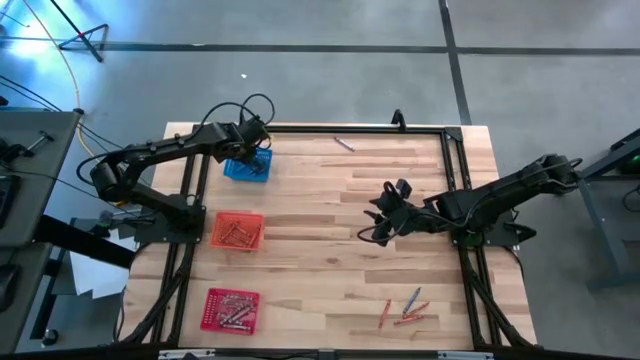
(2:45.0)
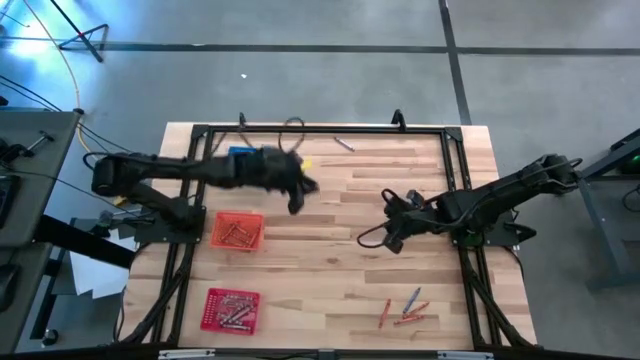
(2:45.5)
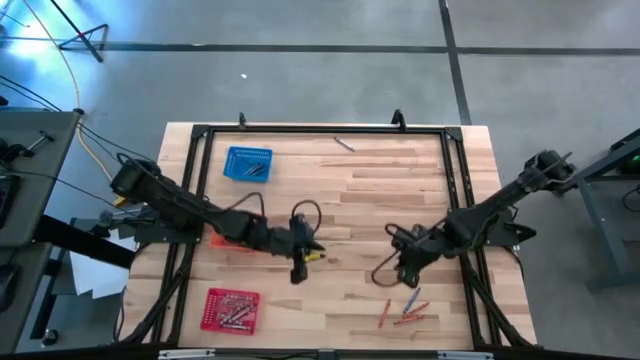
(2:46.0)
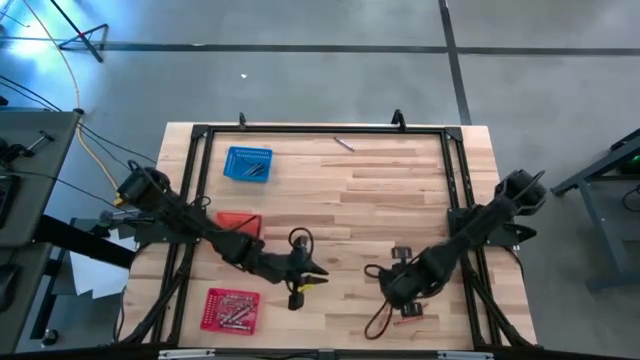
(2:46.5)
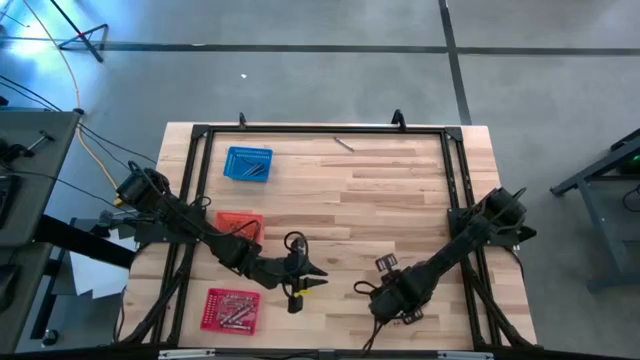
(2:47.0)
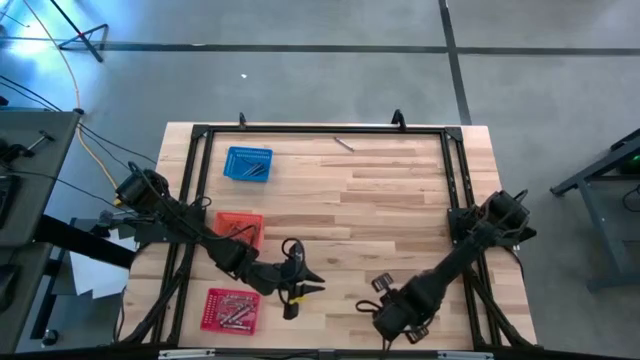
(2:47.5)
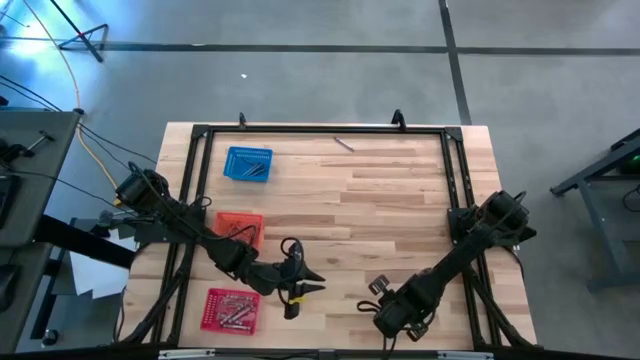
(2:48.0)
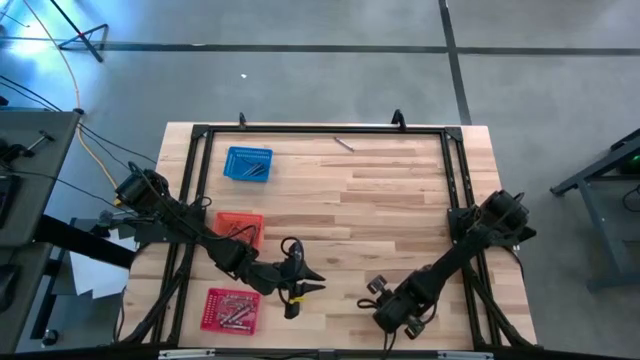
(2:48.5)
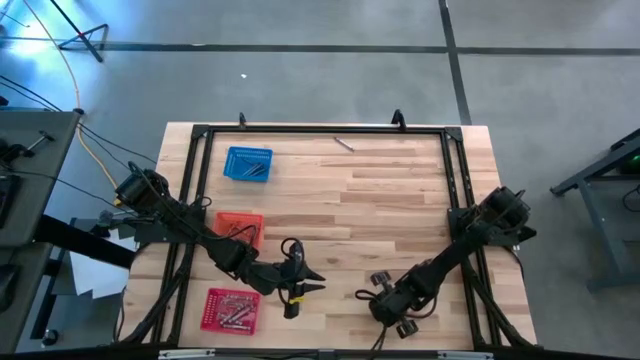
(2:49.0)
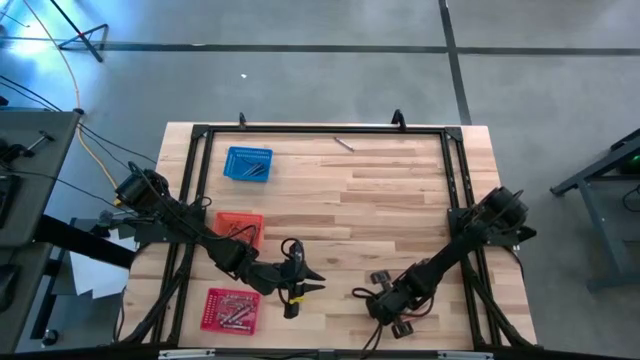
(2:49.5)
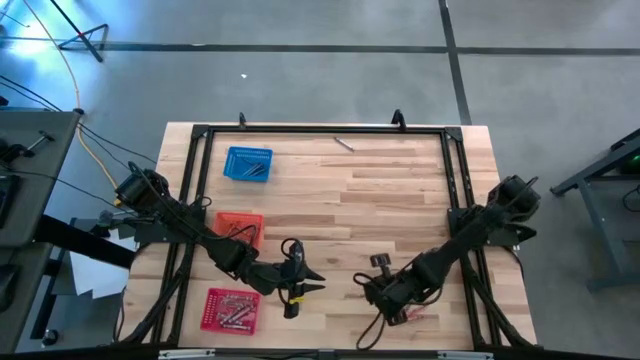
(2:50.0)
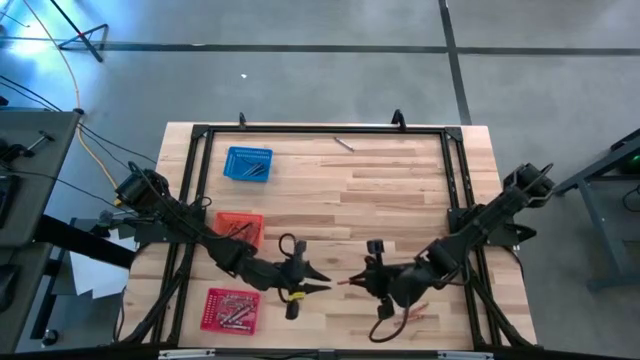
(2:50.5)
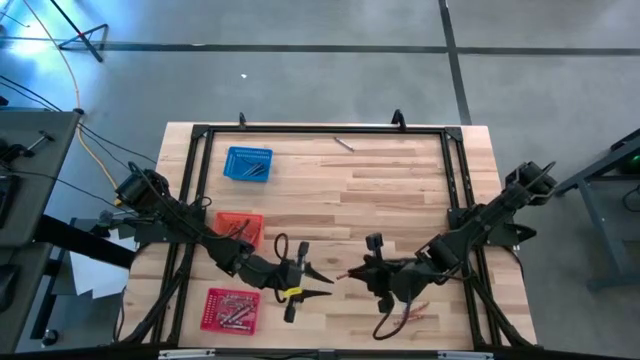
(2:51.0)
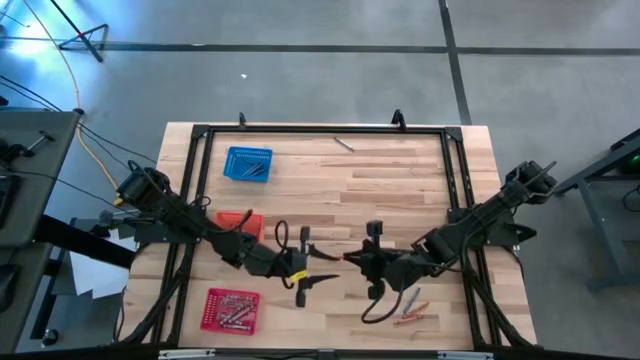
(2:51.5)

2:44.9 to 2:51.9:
Task: Sort crayons
Put the orange crayon into the orange bin

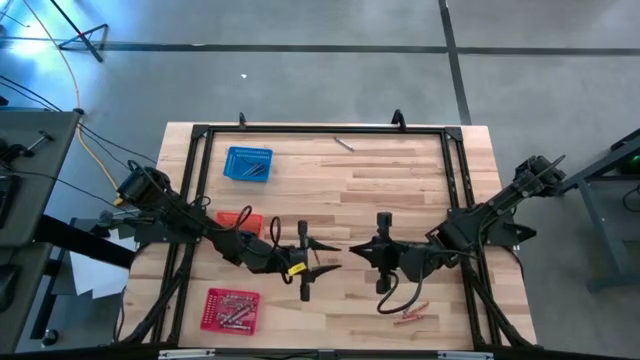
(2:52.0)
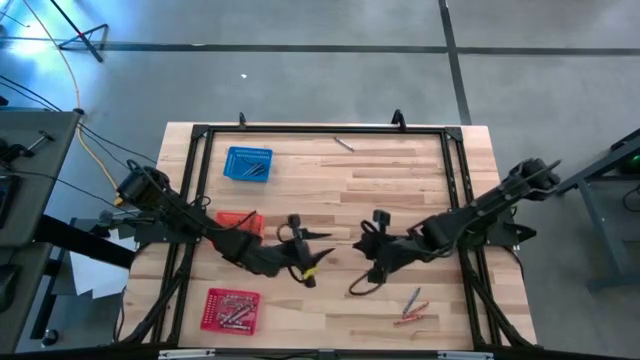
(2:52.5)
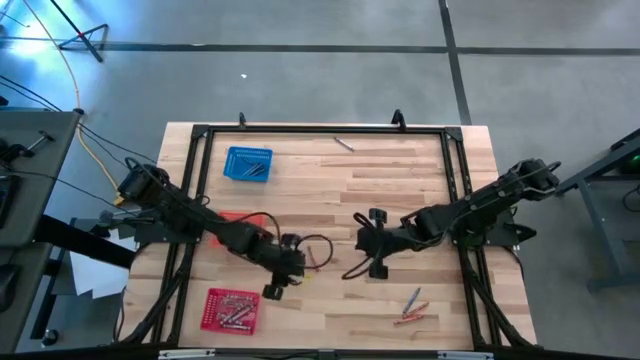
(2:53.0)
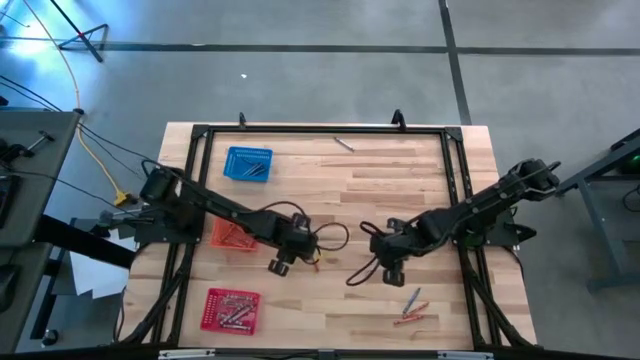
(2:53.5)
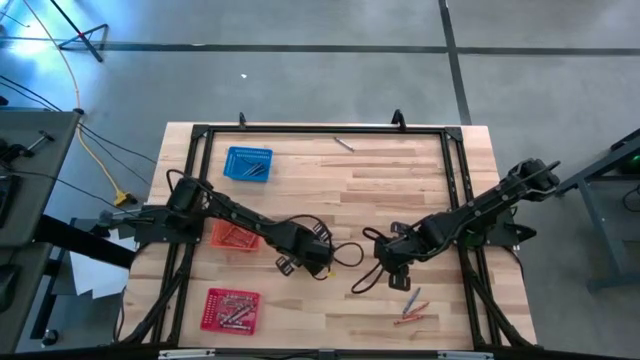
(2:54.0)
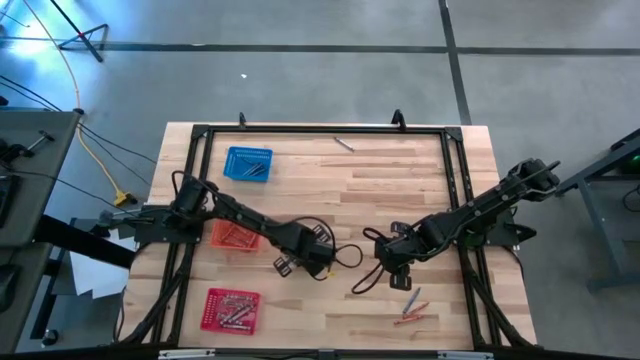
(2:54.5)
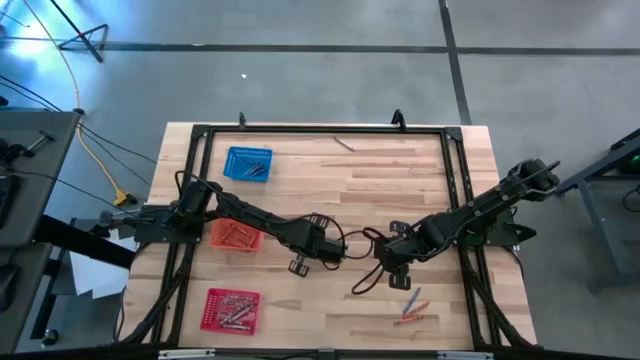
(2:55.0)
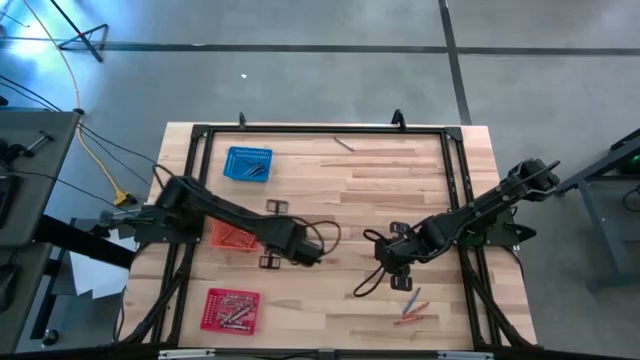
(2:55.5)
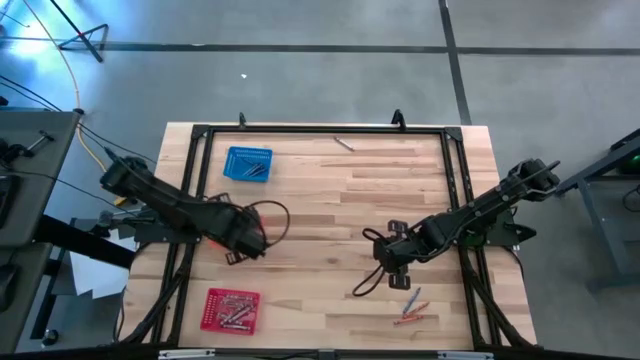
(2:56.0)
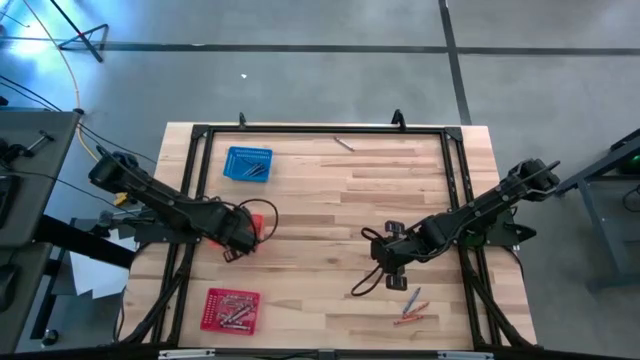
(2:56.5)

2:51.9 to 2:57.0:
Put the orange crayon into the orange bin

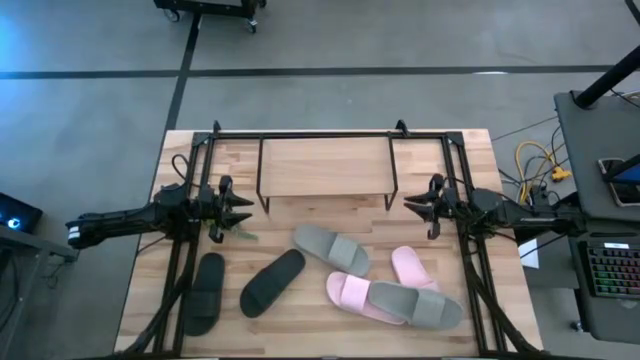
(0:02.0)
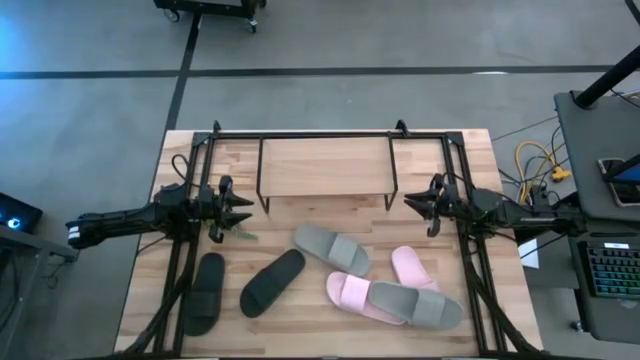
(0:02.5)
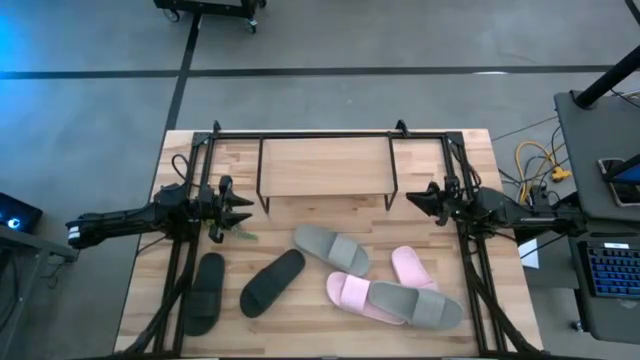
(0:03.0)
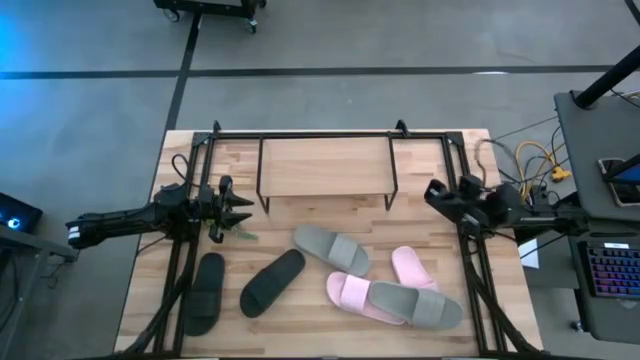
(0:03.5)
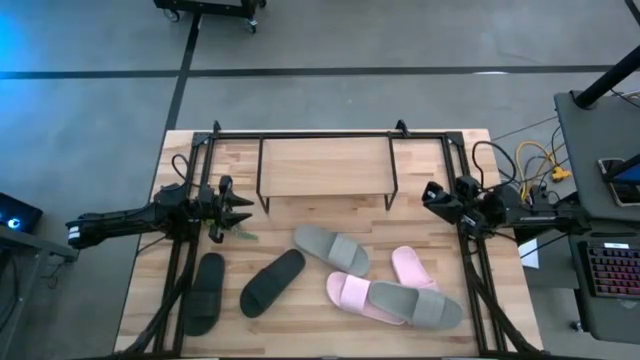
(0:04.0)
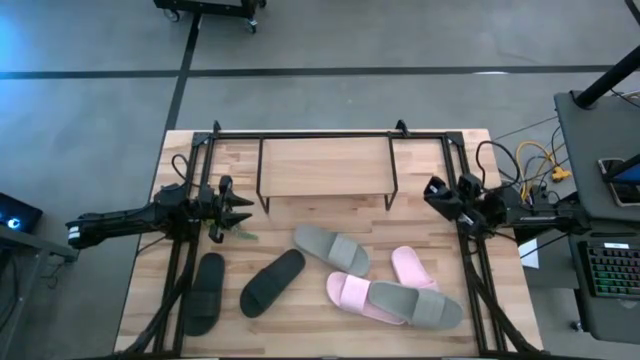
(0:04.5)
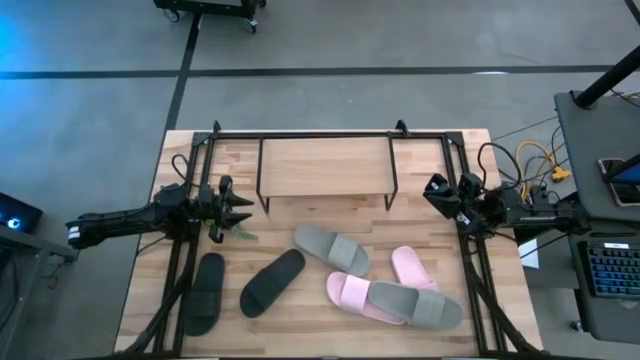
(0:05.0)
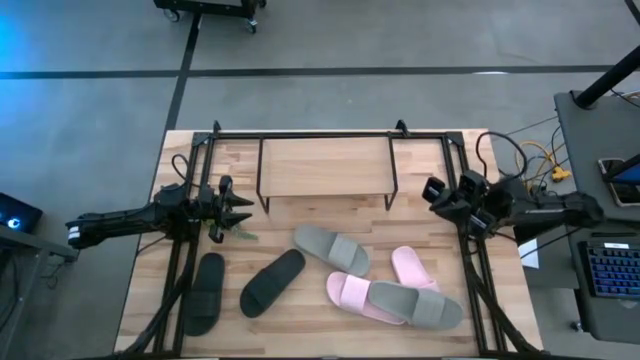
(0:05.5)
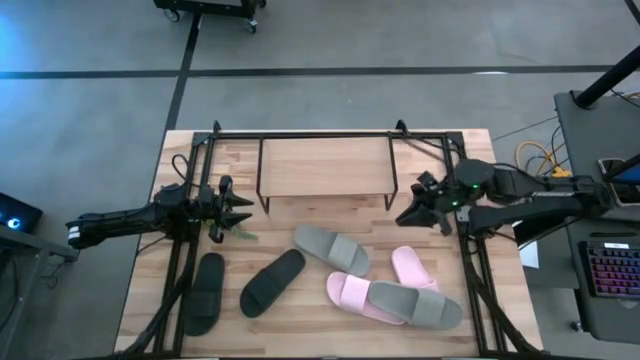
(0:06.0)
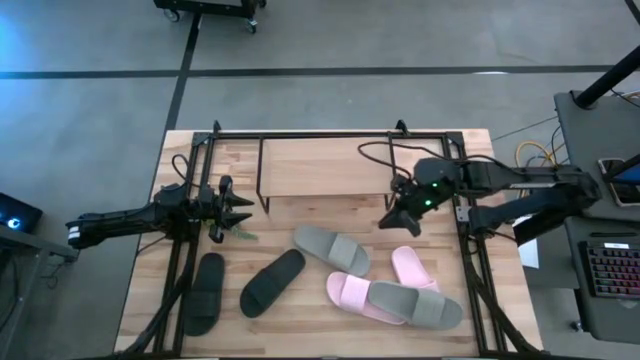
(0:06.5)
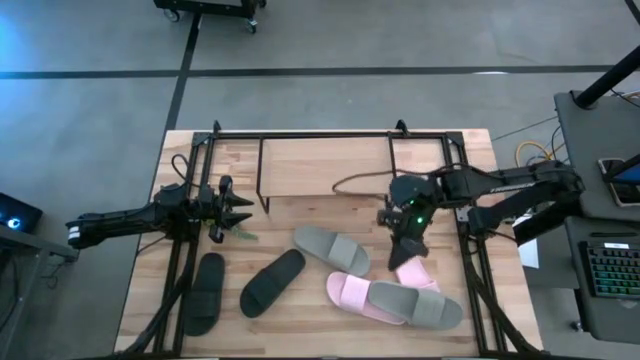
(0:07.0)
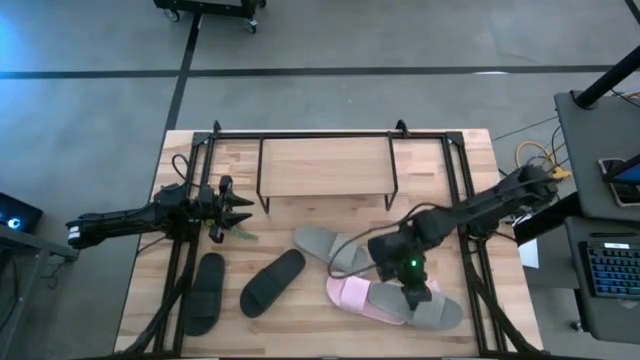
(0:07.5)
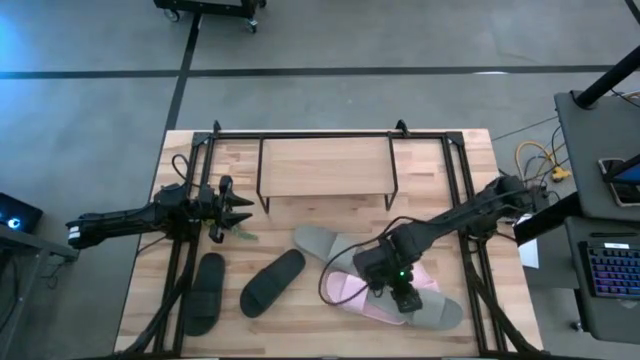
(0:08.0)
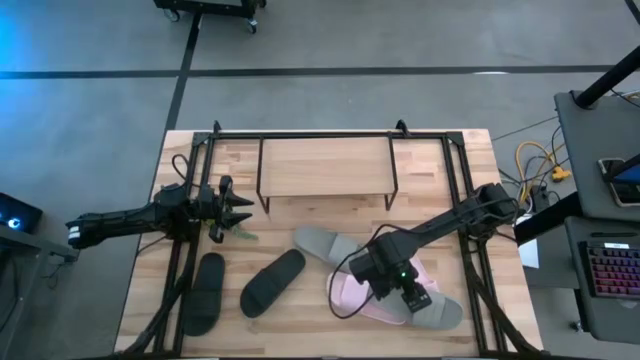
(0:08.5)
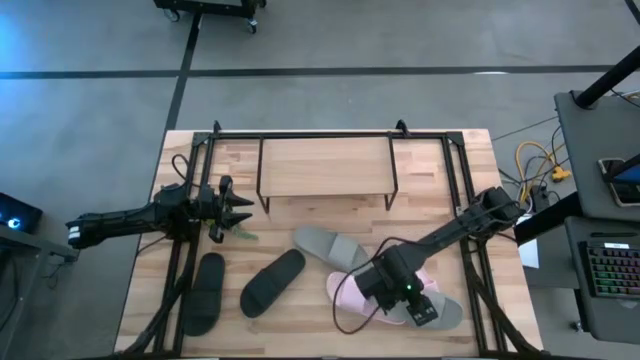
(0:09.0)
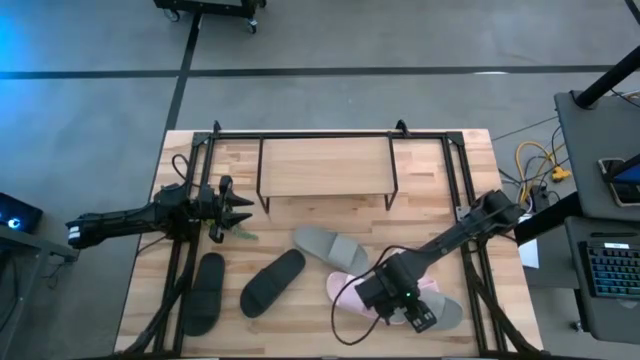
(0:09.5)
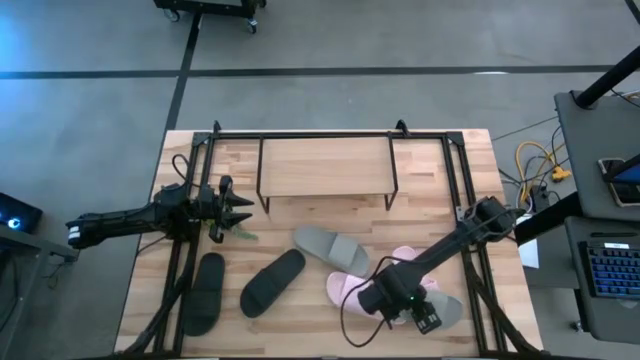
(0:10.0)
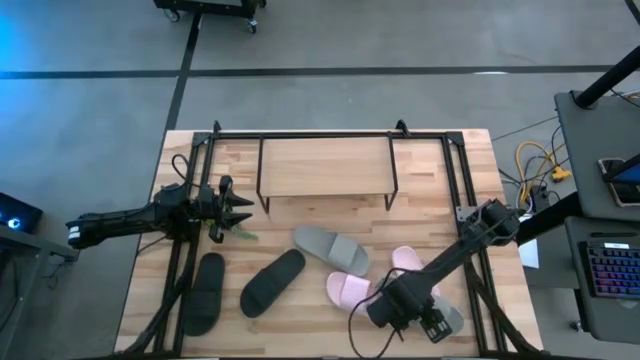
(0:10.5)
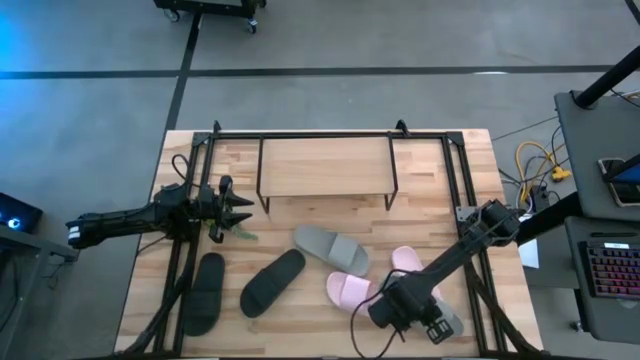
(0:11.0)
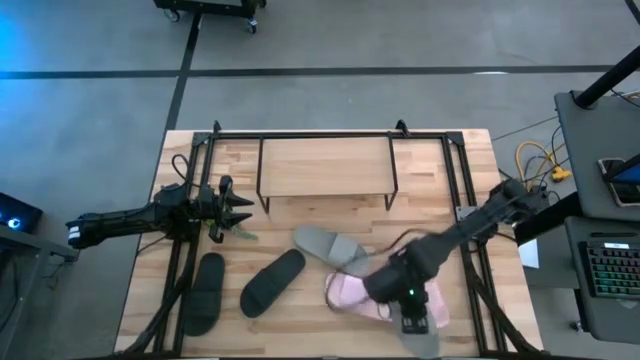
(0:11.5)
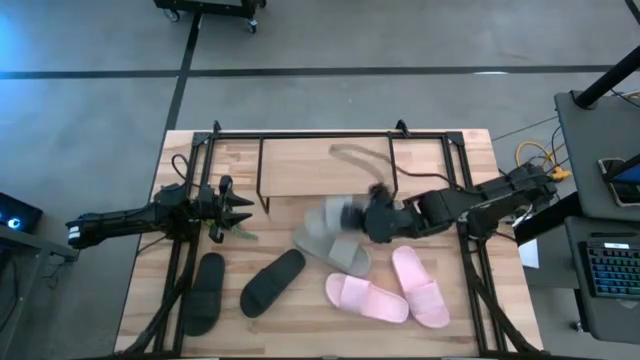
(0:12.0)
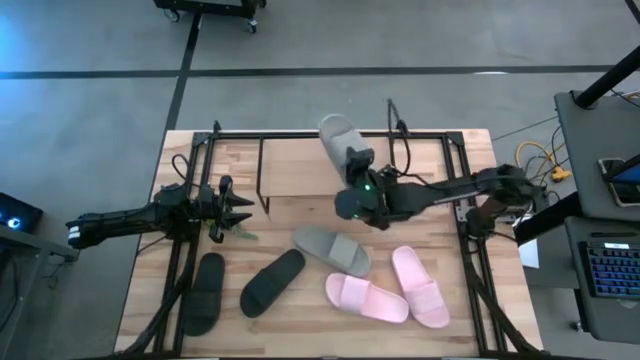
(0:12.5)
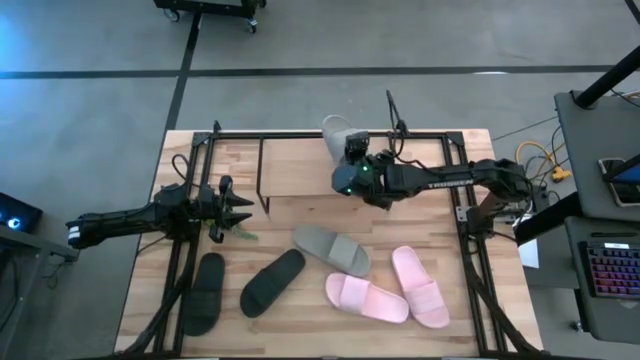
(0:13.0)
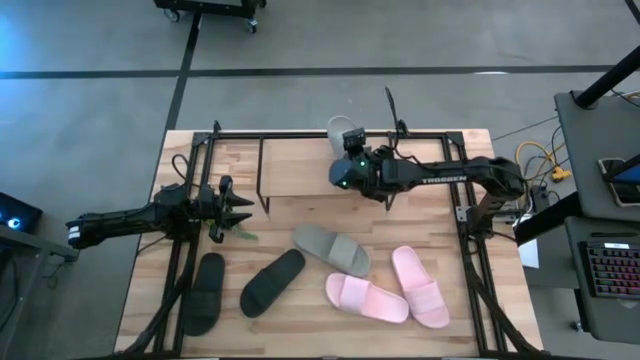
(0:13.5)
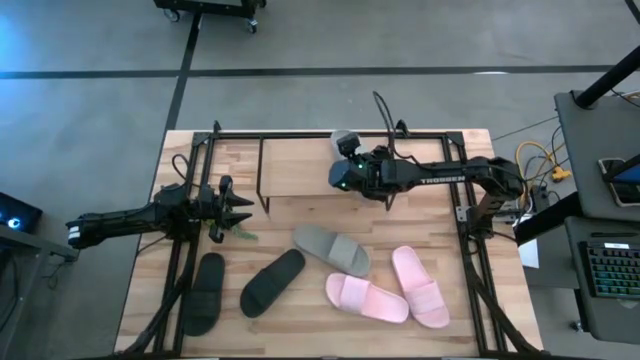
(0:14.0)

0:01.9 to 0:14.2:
Task: Pick and place slides into the shelf
Put the right gray slide on the shelf
